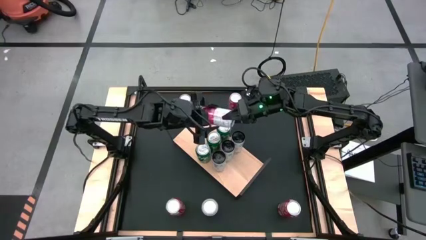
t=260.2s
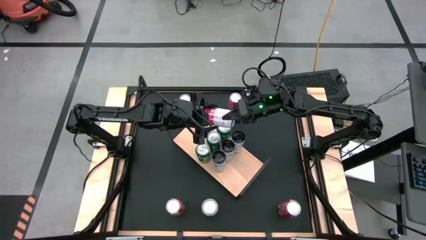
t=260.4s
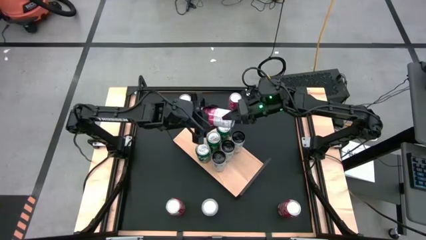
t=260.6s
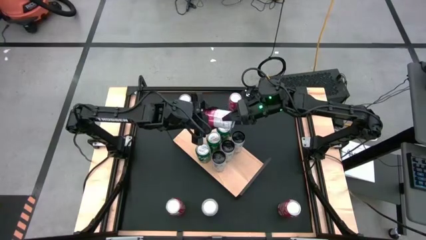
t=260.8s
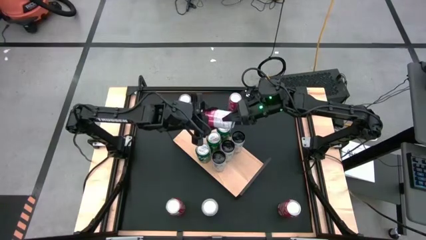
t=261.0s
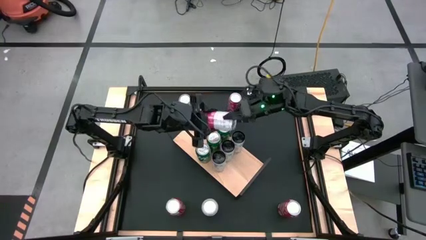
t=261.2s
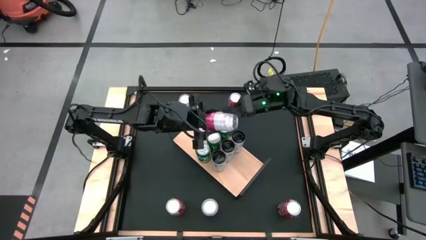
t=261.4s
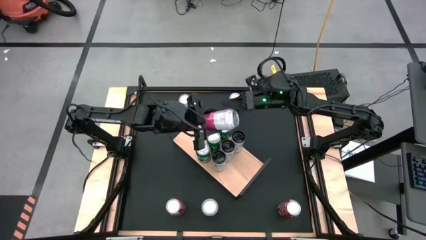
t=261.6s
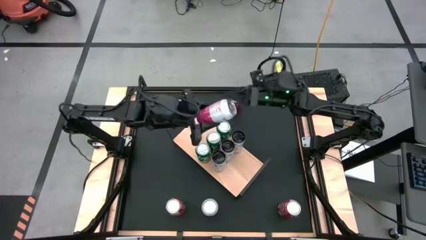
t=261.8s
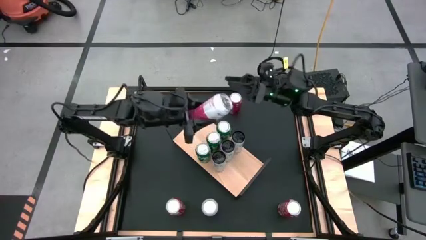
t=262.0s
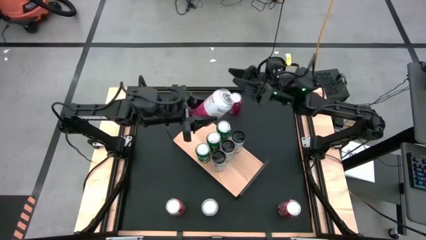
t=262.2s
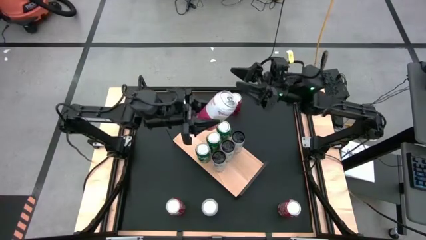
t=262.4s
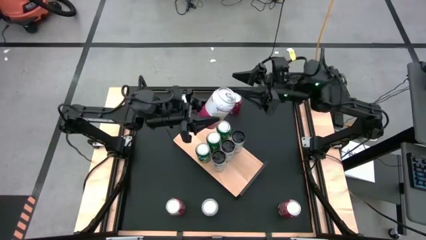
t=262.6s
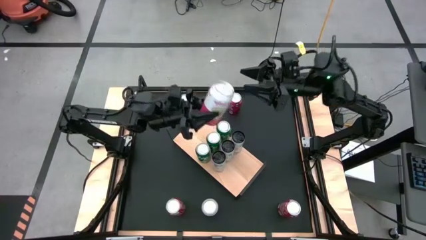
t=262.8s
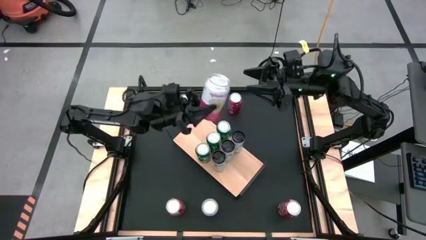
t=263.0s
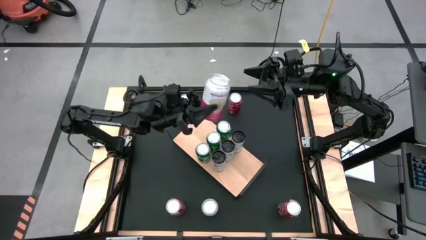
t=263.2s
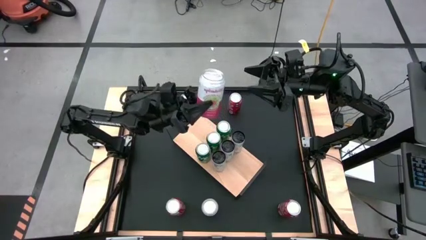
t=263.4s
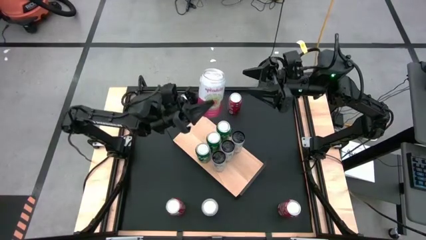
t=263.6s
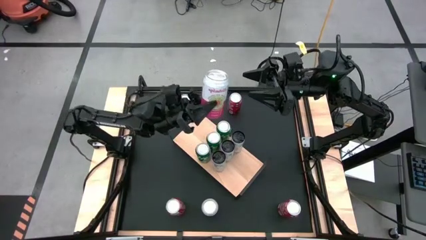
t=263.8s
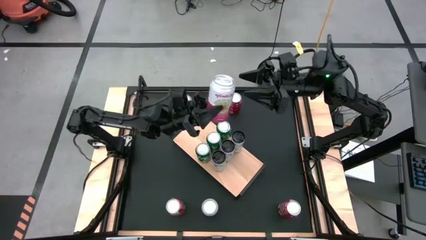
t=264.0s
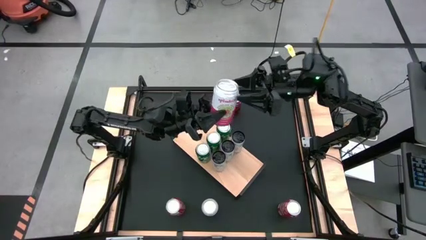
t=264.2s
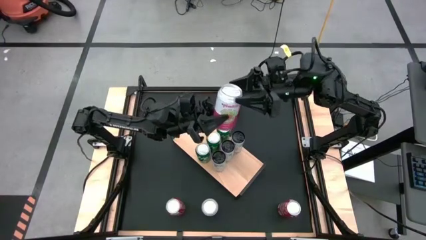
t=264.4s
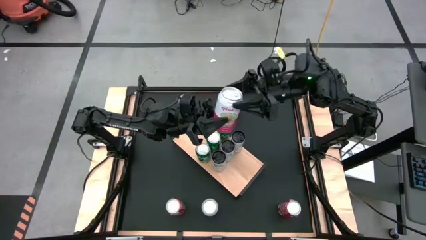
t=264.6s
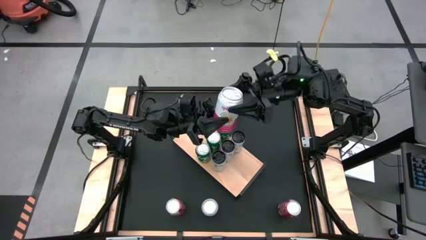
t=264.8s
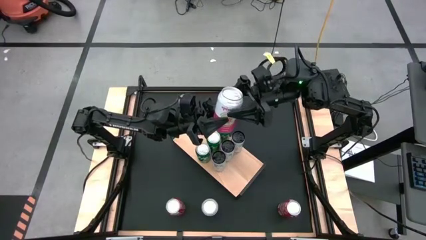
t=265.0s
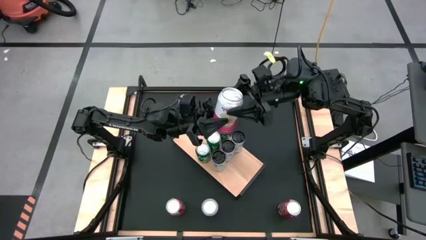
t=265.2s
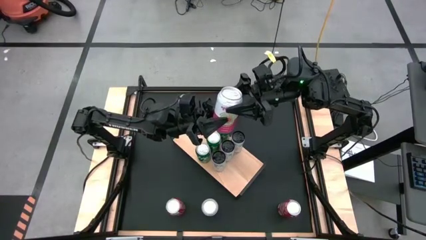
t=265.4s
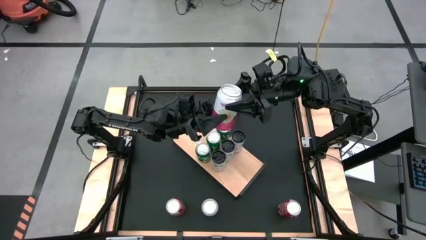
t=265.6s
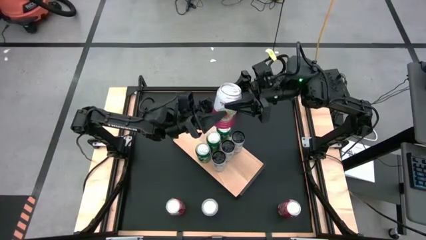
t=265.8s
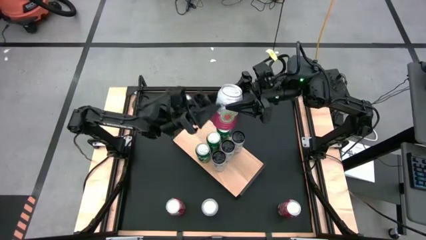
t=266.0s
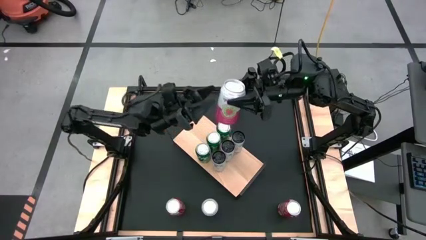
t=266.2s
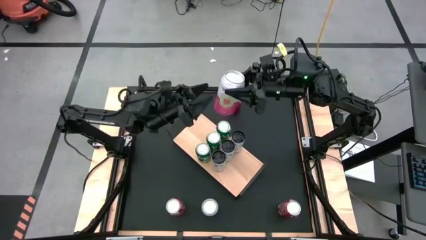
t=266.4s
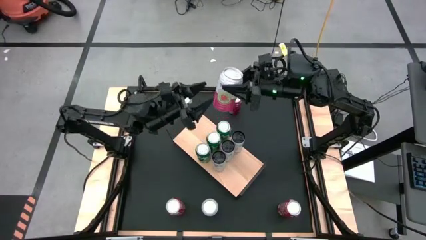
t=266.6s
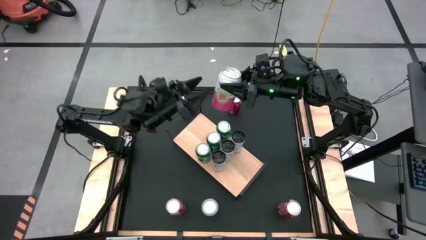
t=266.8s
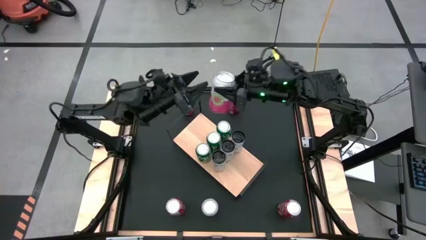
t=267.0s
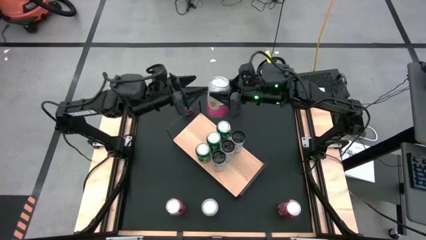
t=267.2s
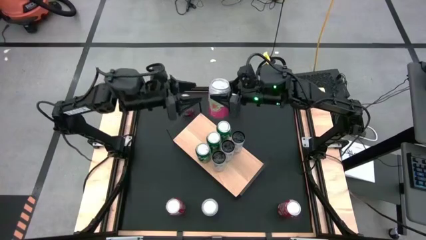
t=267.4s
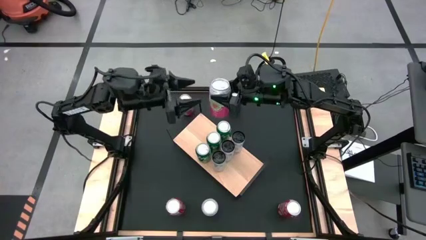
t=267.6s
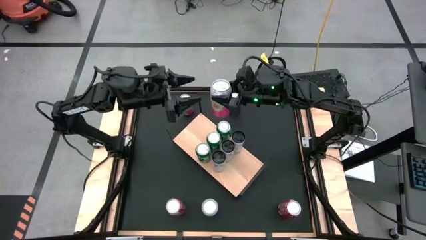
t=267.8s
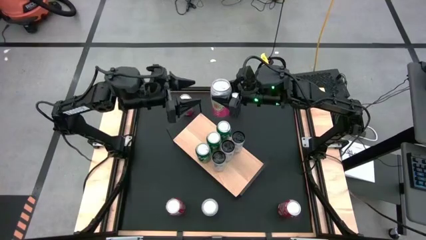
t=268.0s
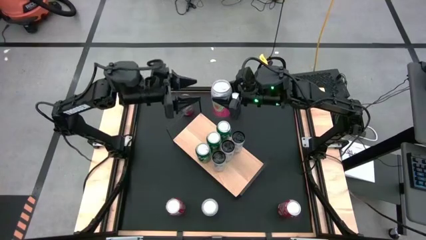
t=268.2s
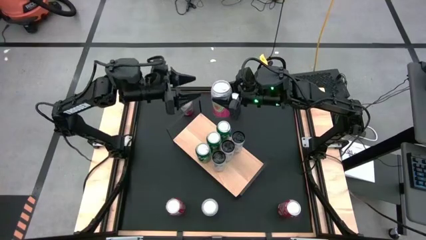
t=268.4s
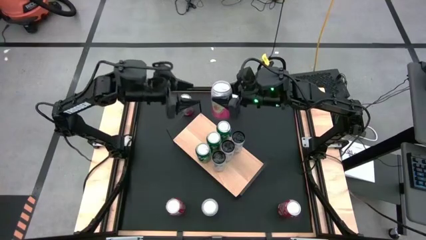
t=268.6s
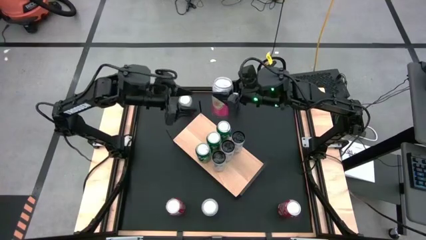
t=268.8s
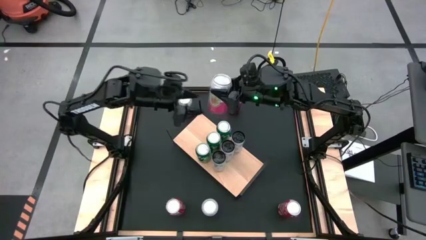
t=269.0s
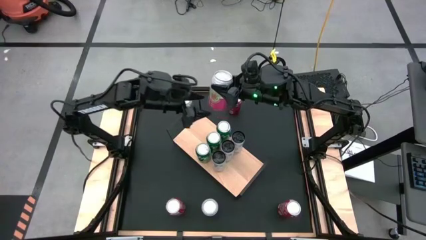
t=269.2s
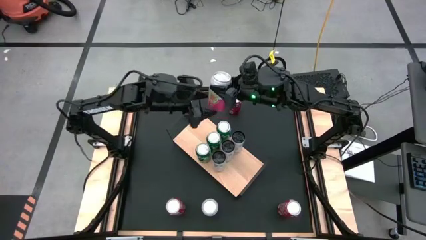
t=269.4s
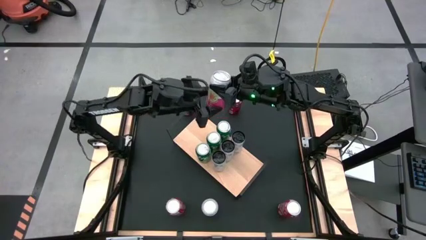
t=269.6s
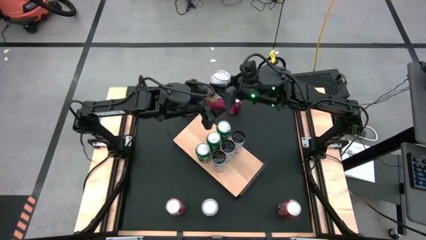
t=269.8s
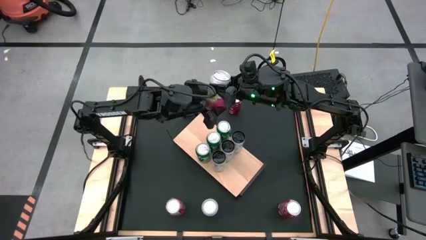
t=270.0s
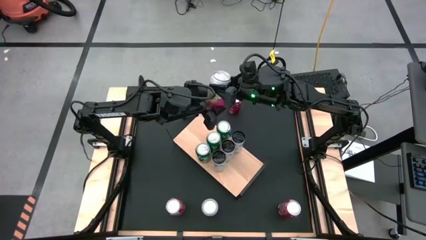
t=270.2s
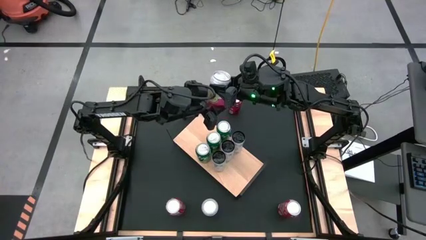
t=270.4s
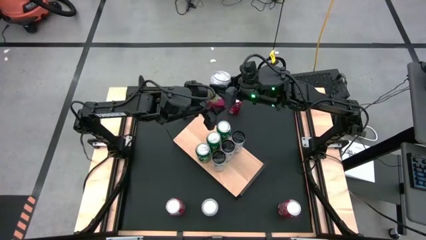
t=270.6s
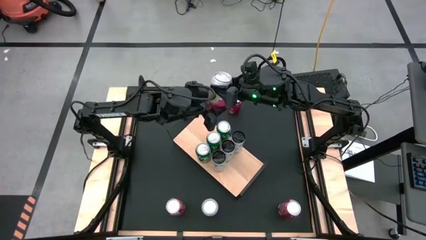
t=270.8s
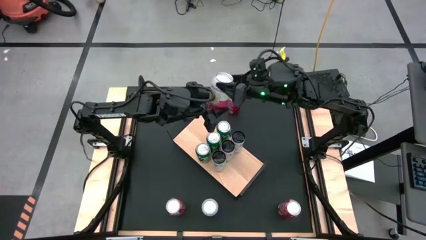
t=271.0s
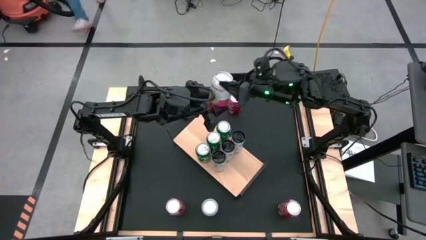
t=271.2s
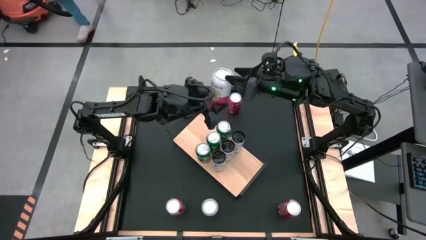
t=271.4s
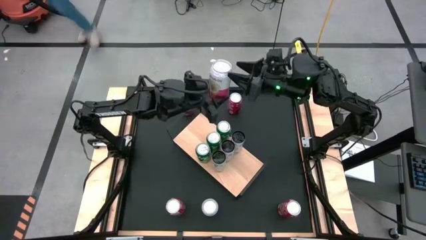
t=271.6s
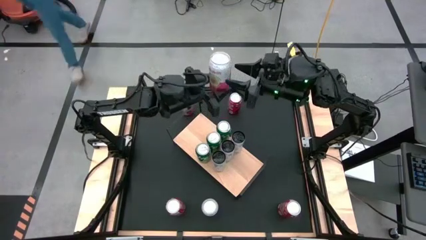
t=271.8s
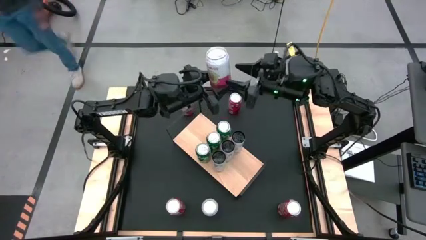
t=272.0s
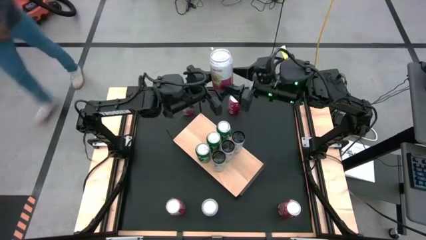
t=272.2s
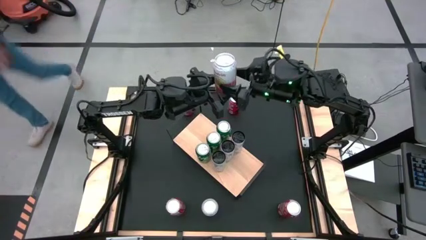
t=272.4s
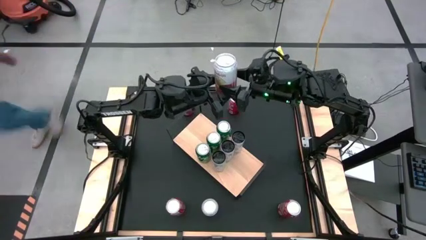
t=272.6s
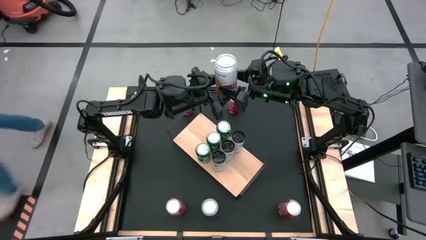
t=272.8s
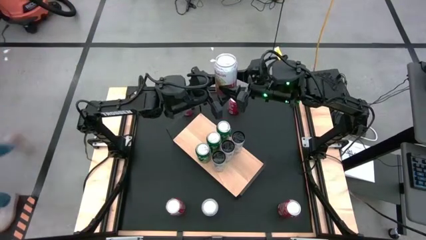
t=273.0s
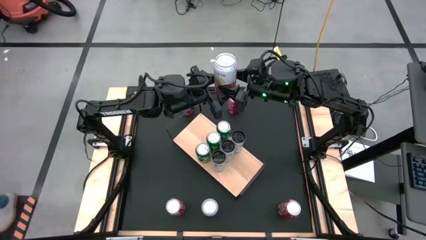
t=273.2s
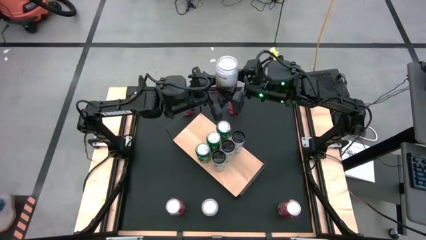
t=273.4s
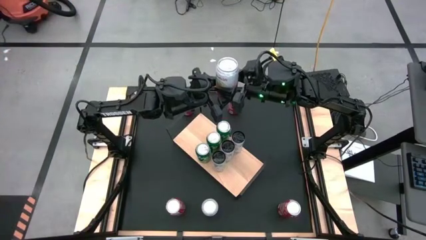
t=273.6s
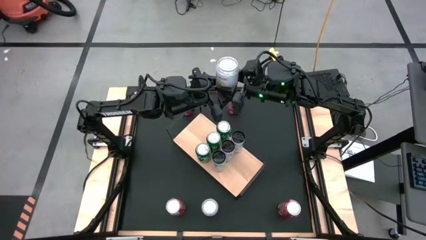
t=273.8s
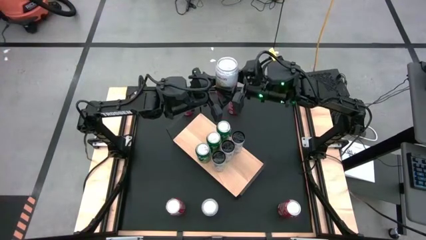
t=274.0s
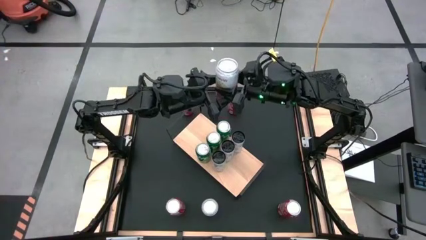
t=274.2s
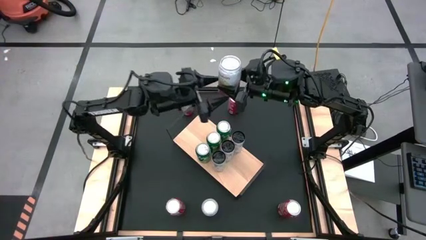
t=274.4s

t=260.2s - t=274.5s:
Task: Place canned beverage on shelf
Put the top right white and pink soda can on the shelf
